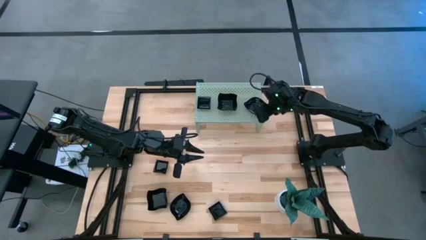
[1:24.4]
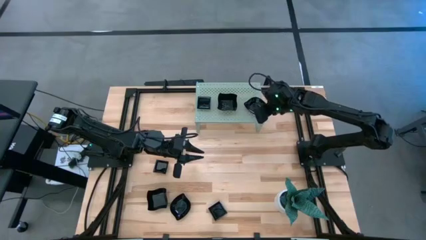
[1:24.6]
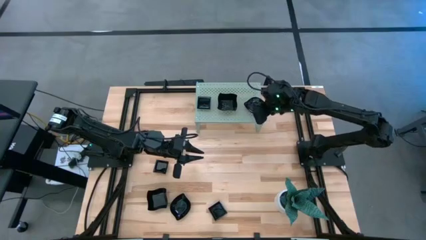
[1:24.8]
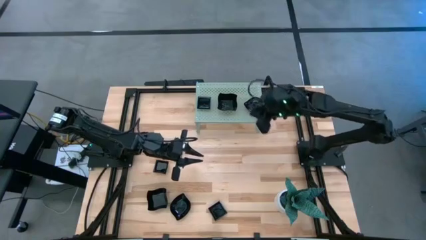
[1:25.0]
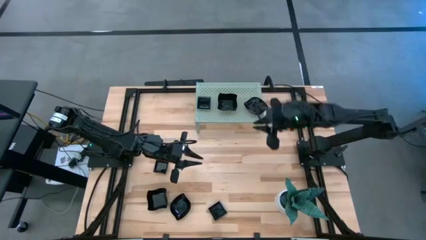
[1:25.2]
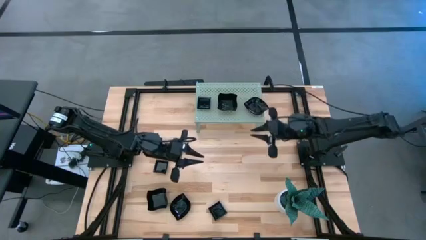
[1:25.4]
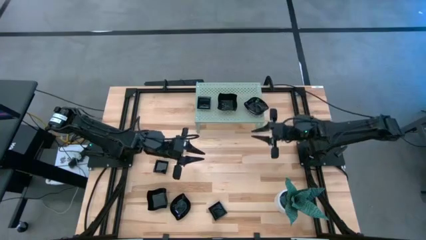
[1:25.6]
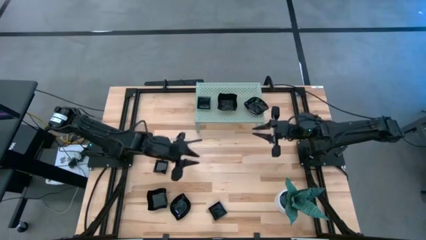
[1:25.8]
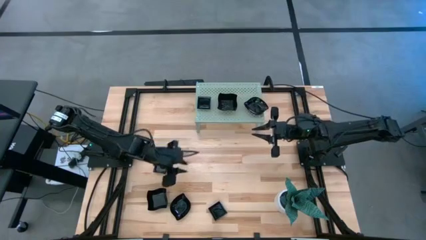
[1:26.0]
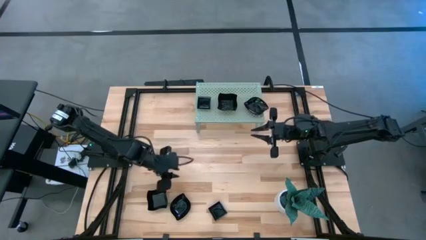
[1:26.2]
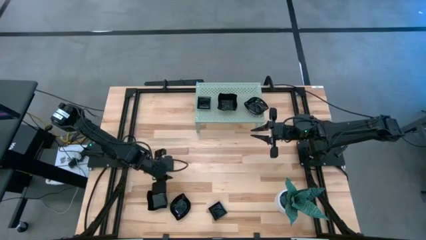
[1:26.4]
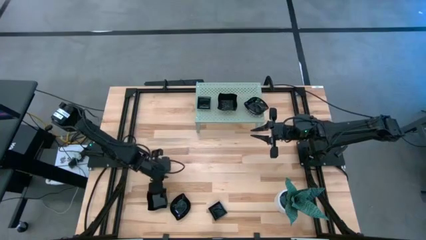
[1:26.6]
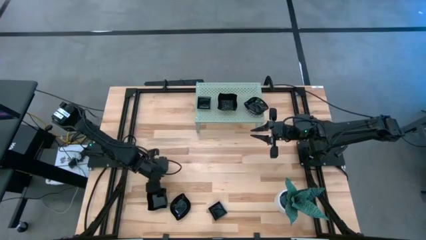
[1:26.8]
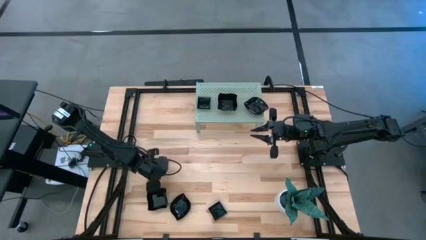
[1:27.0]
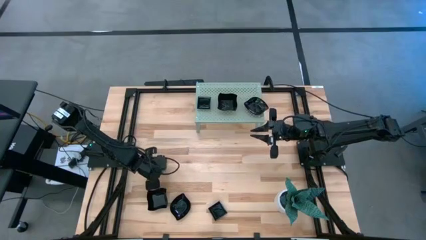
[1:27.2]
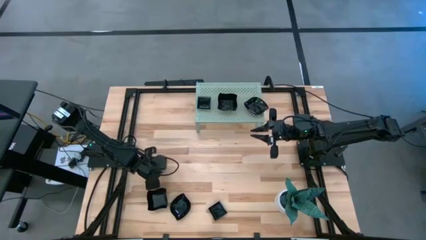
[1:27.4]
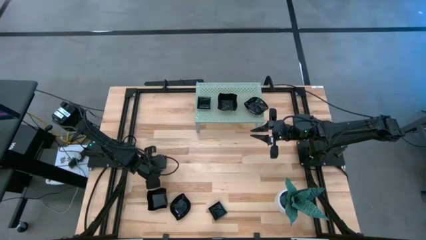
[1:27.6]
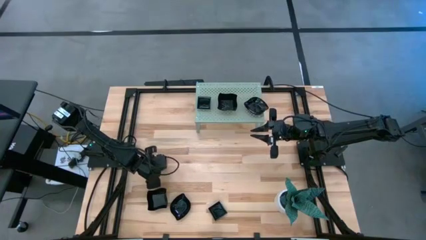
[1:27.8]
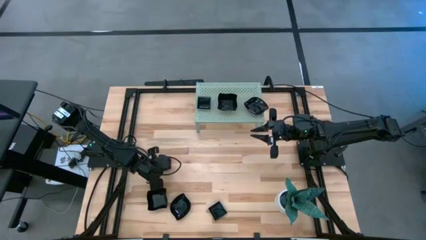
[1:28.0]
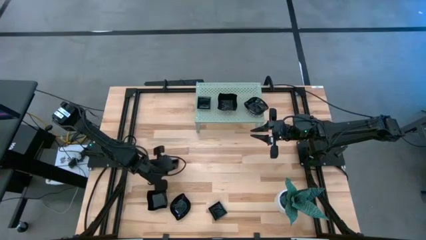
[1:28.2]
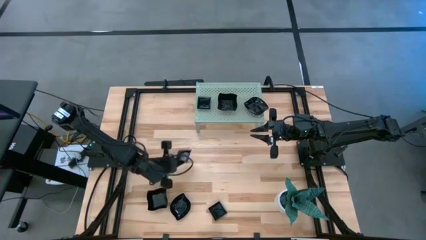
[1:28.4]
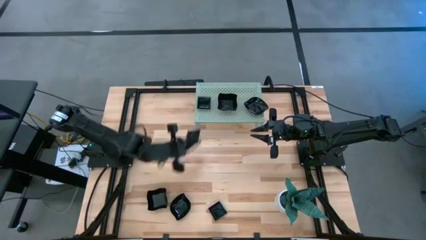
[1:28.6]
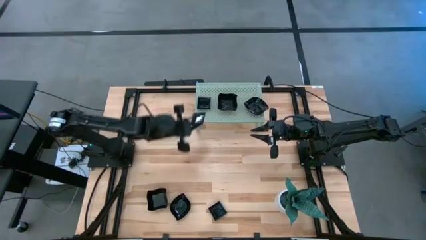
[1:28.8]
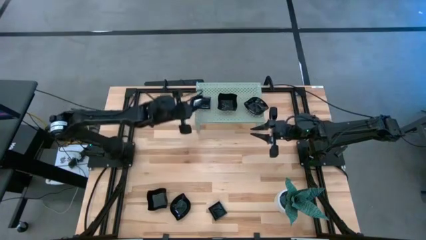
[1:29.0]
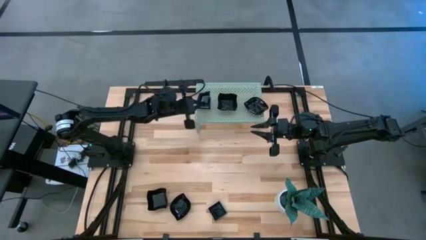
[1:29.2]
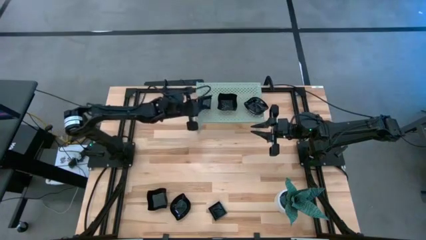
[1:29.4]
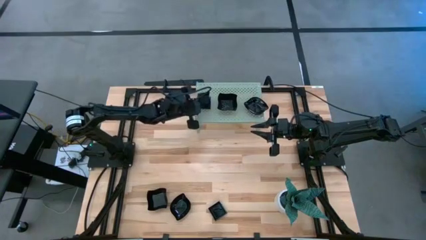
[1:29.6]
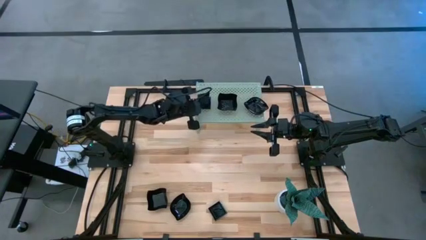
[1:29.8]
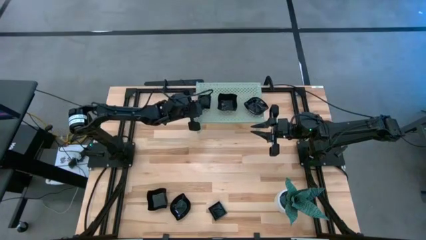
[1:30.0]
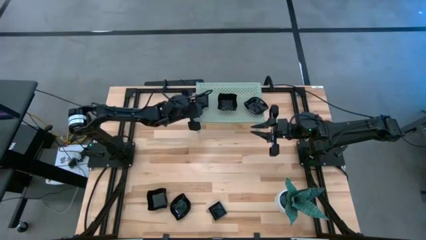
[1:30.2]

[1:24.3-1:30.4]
Task: Pick & Place Mini shaped plates
Stack the square plate on top of the other square plate on the shelf

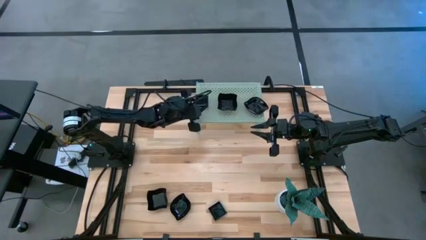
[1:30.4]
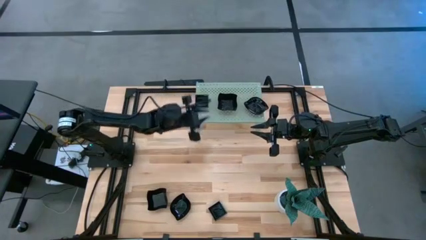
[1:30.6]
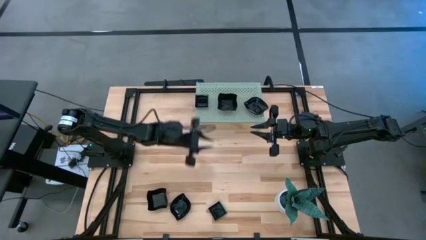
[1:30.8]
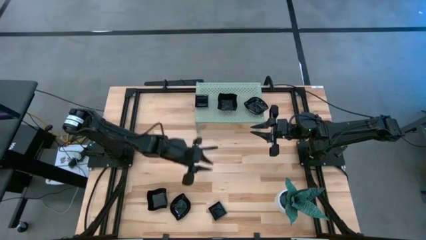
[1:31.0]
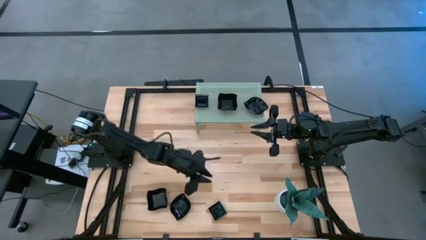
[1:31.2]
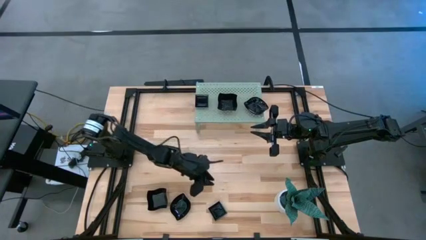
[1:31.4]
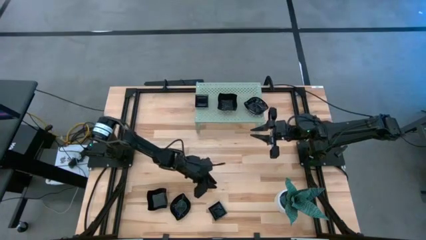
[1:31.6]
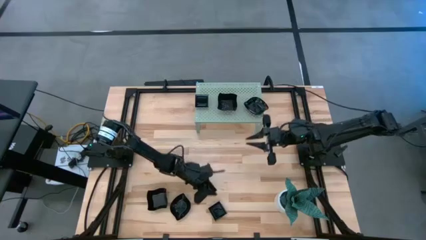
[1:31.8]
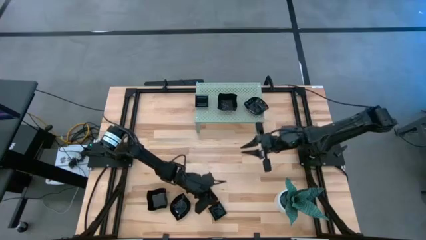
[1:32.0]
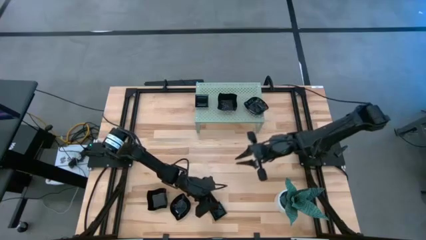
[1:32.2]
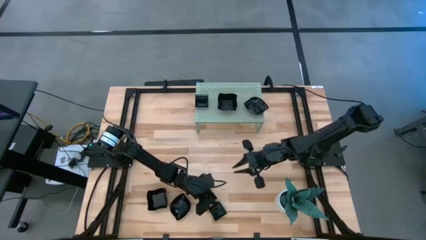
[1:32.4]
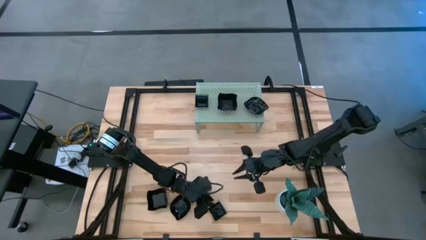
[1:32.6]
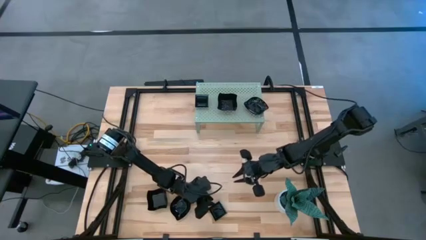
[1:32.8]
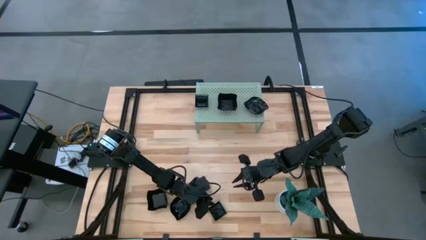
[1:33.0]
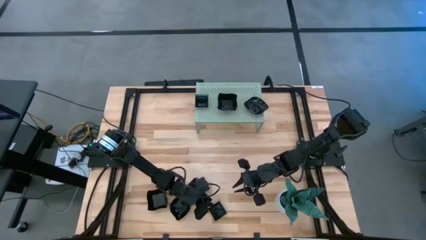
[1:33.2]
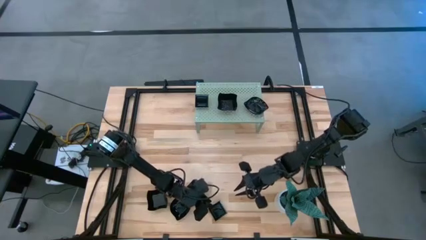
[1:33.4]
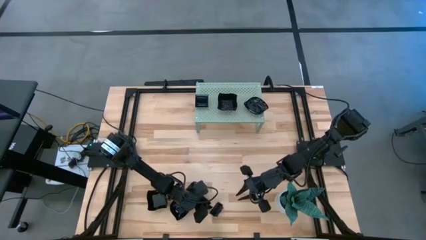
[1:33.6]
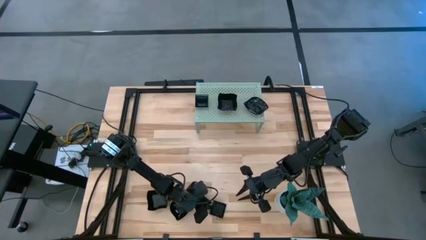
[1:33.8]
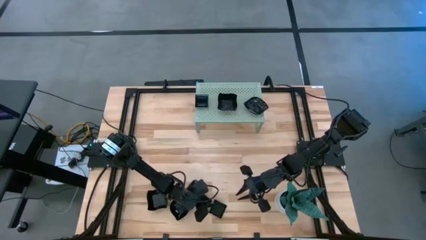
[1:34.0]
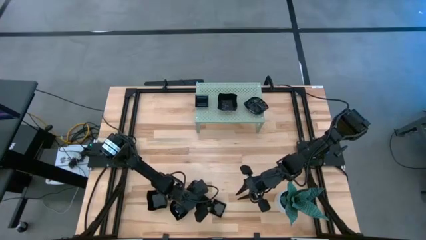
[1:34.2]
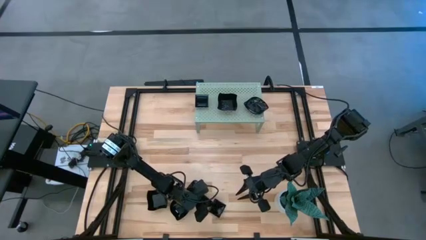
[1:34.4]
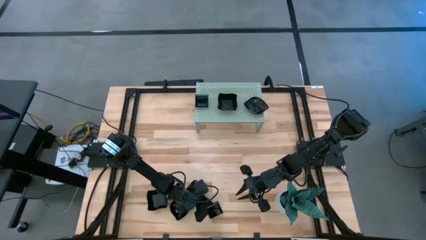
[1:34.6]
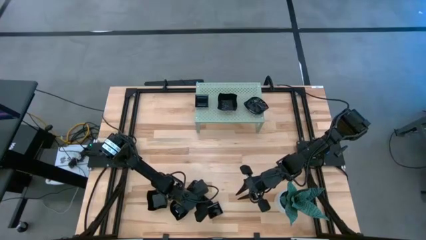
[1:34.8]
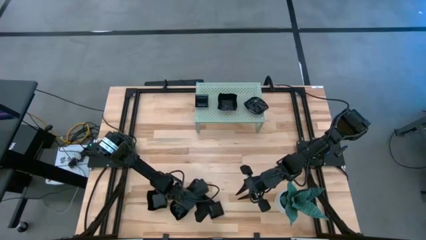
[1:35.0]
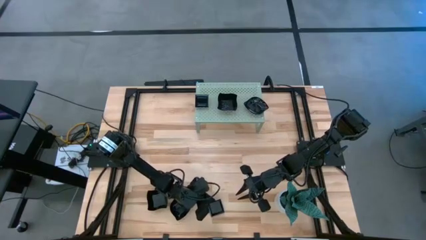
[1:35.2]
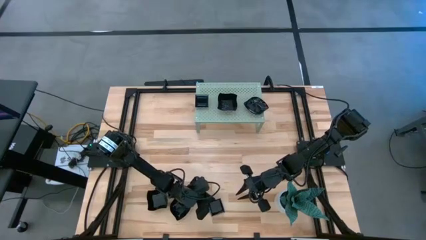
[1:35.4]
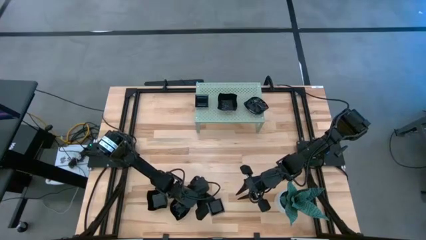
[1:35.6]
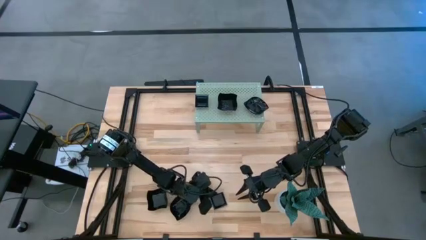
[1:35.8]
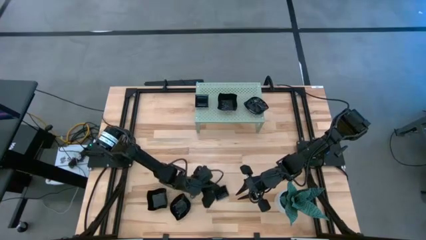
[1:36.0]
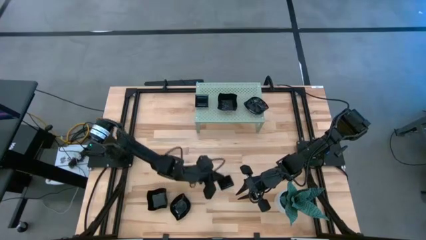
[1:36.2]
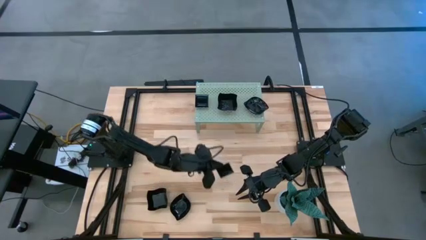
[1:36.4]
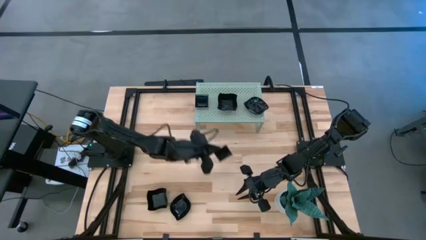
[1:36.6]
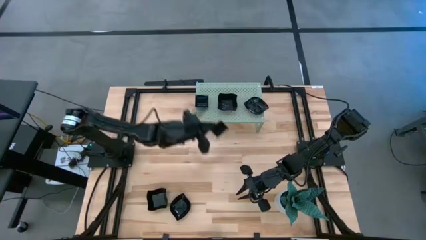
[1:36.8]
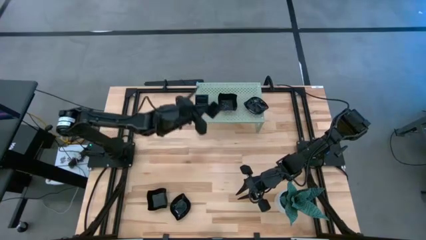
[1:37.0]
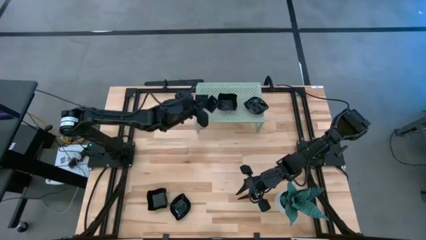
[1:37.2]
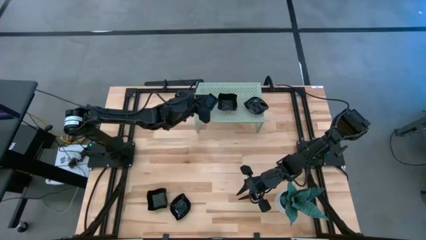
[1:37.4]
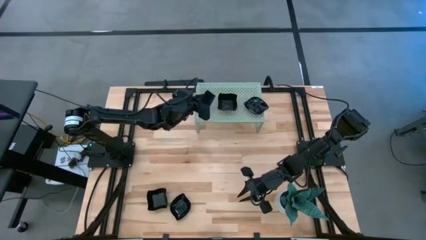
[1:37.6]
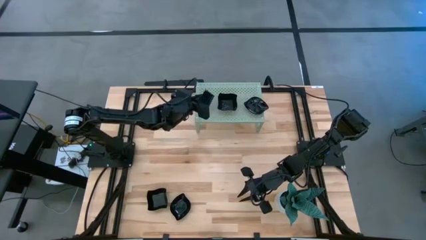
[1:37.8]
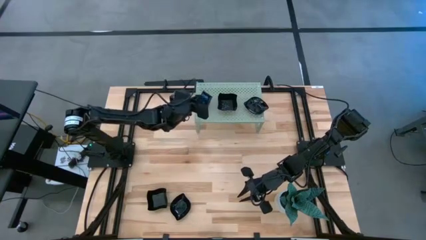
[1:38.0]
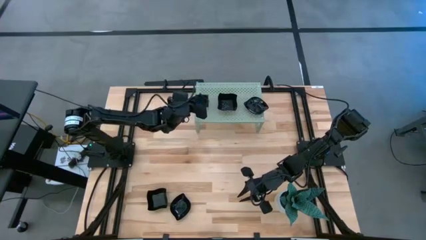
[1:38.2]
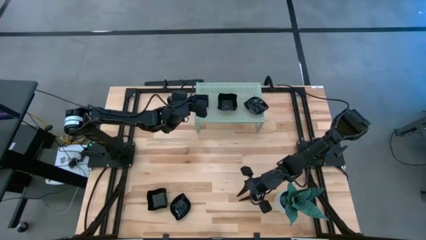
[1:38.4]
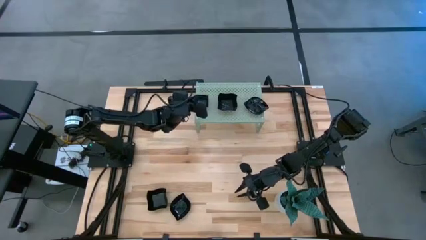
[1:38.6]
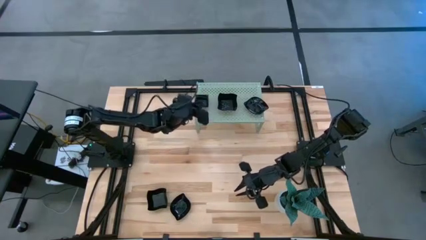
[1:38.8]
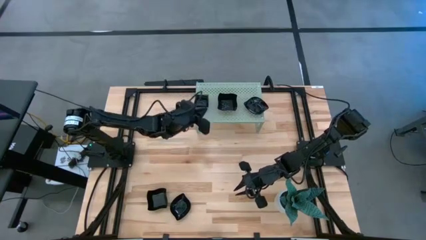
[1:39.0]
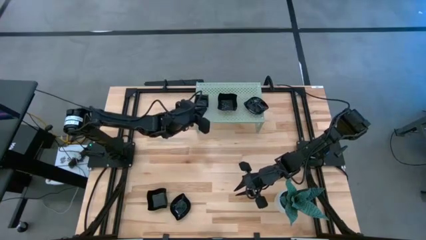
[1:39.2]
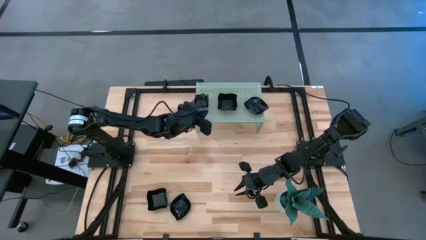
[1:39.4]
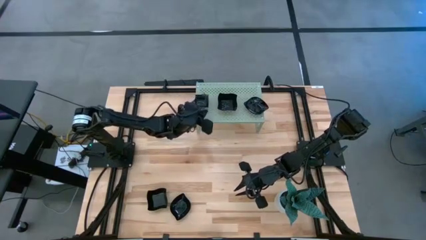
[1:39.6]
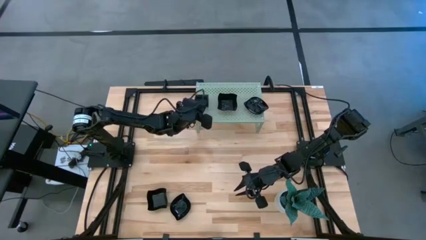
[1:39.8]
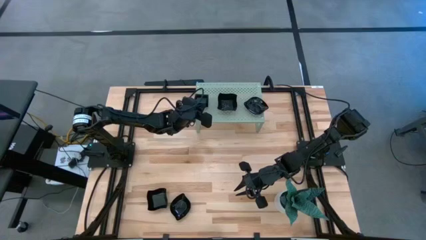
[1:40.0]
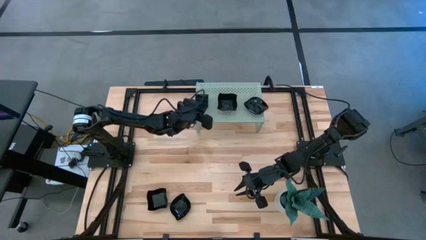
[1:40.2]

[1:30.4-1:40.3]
Stack the square plate on top of the other square plate on the shelf
